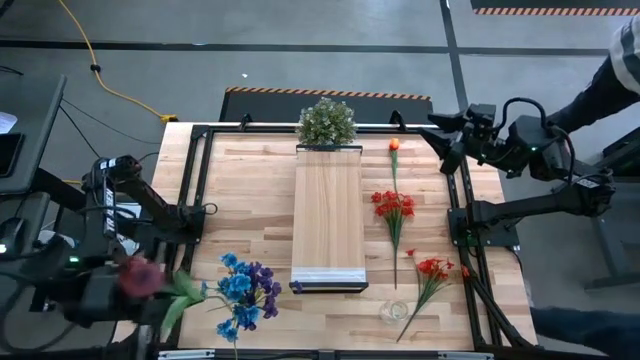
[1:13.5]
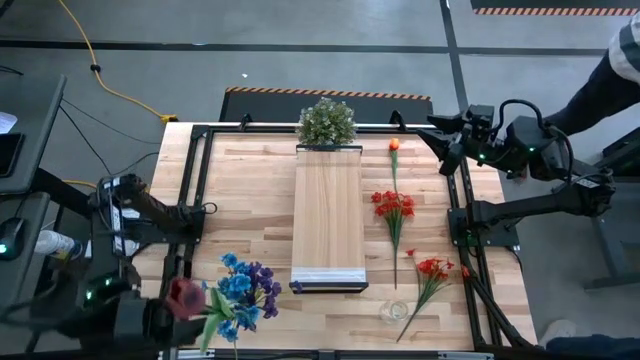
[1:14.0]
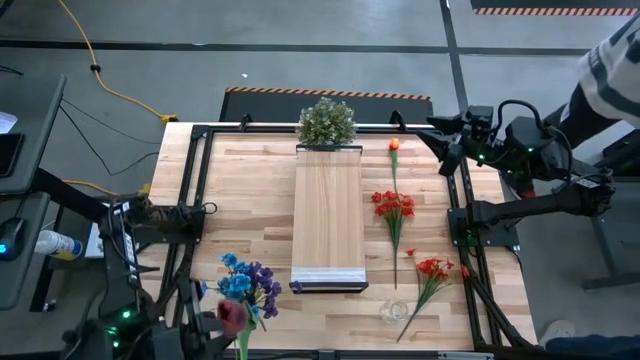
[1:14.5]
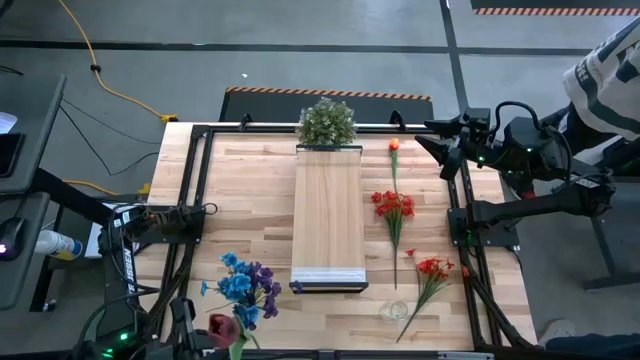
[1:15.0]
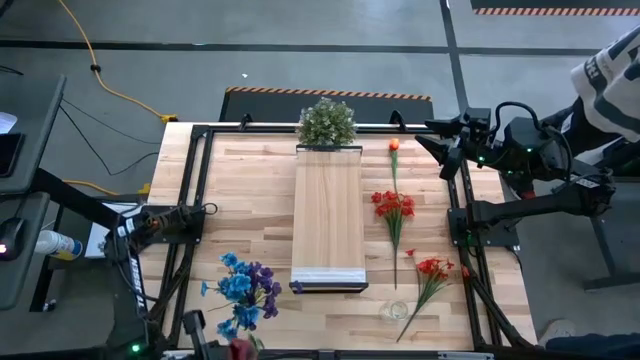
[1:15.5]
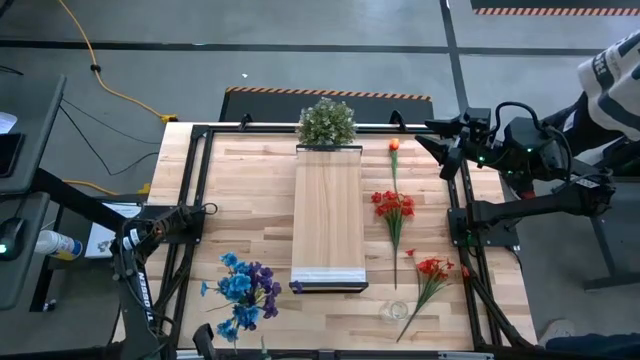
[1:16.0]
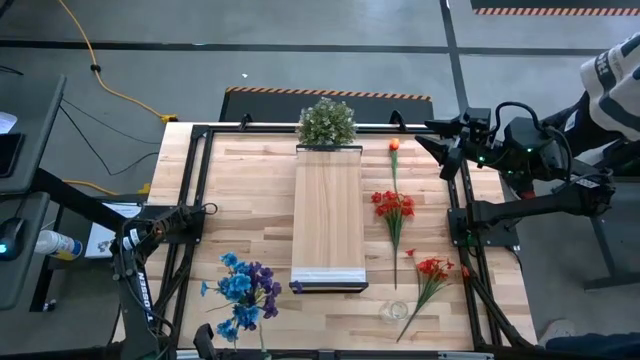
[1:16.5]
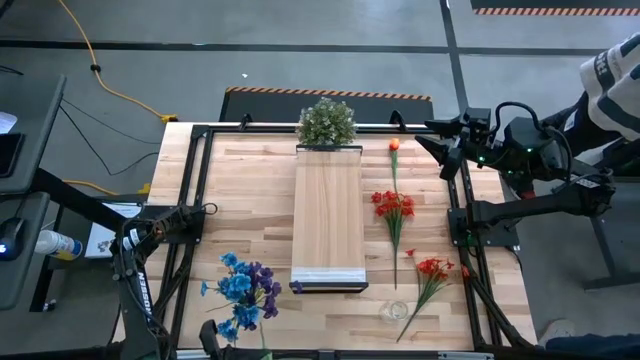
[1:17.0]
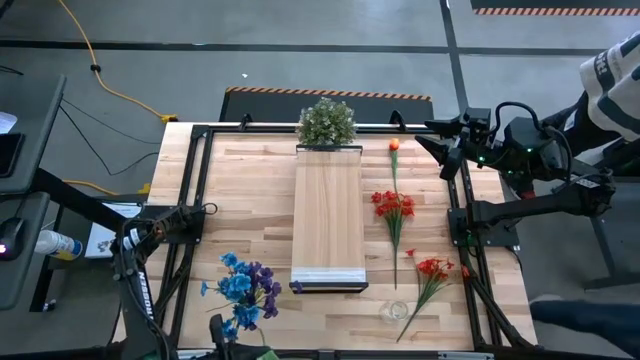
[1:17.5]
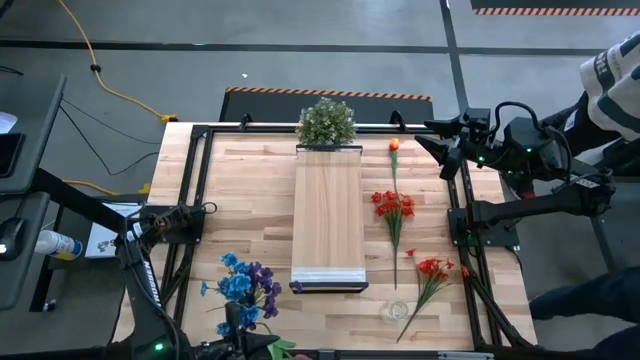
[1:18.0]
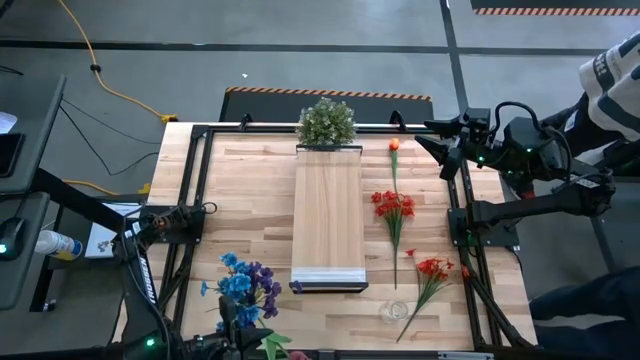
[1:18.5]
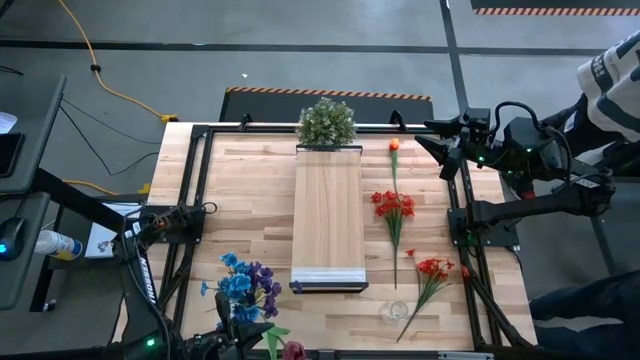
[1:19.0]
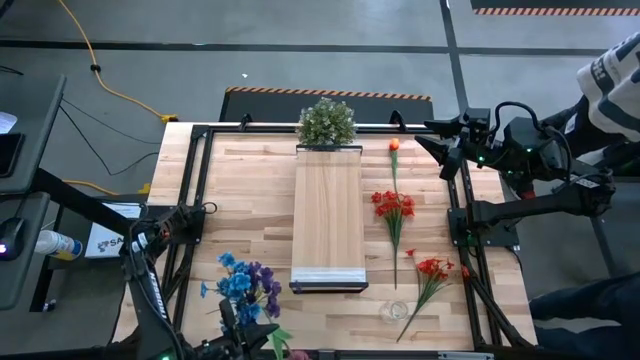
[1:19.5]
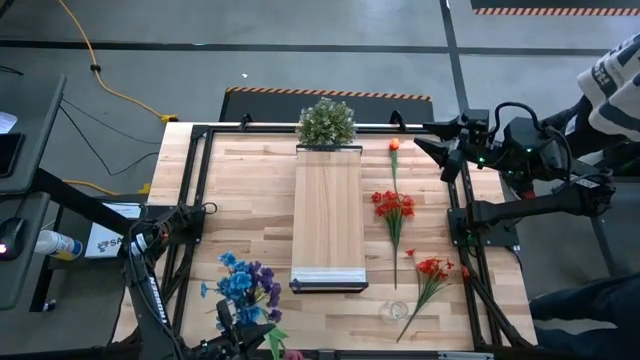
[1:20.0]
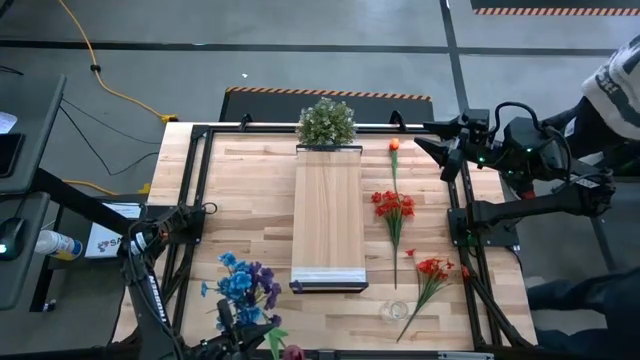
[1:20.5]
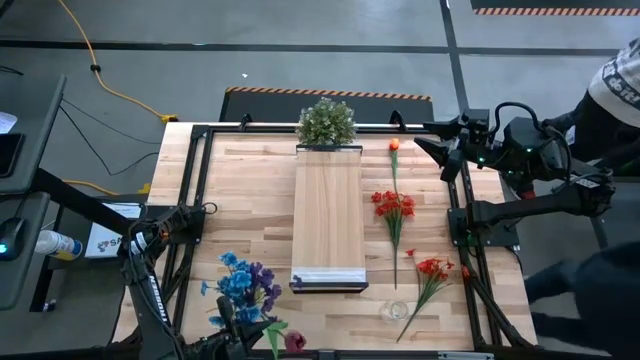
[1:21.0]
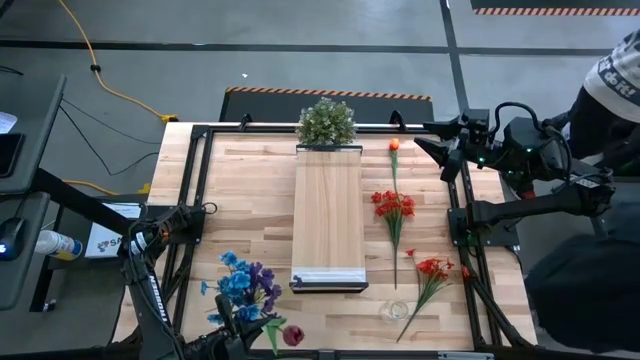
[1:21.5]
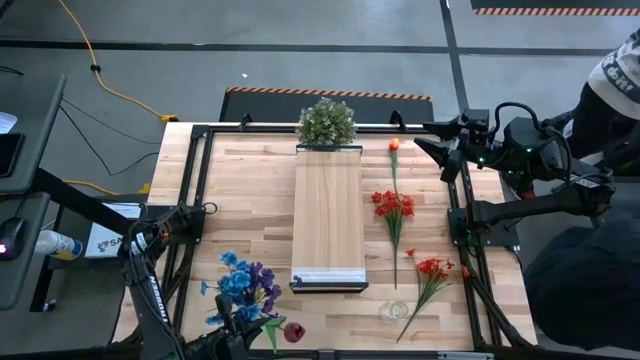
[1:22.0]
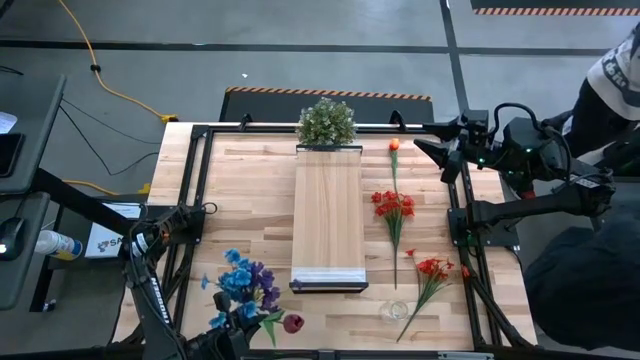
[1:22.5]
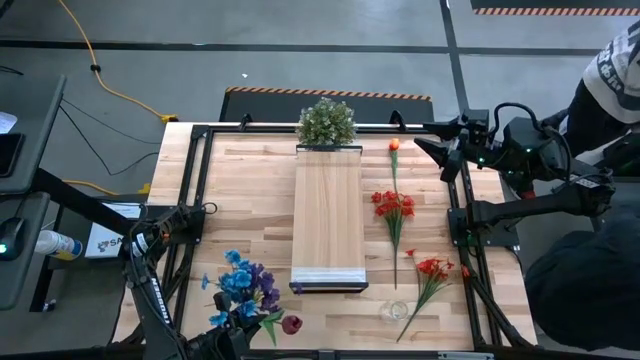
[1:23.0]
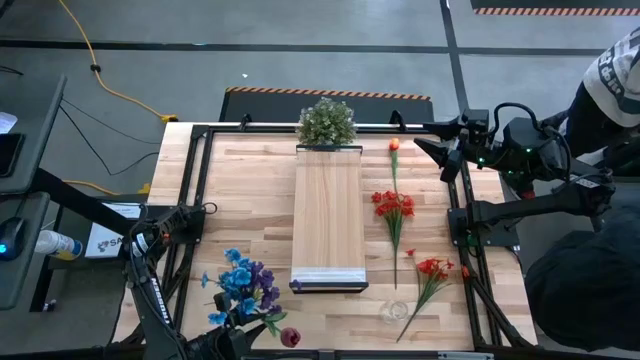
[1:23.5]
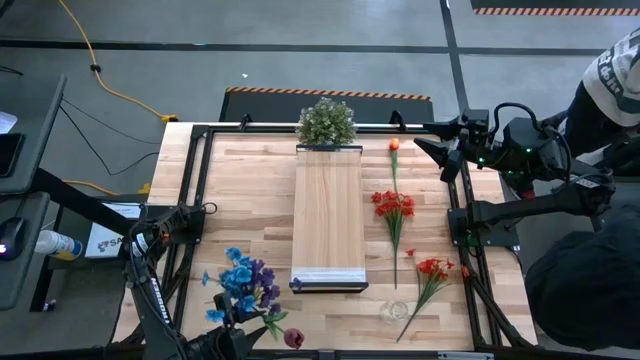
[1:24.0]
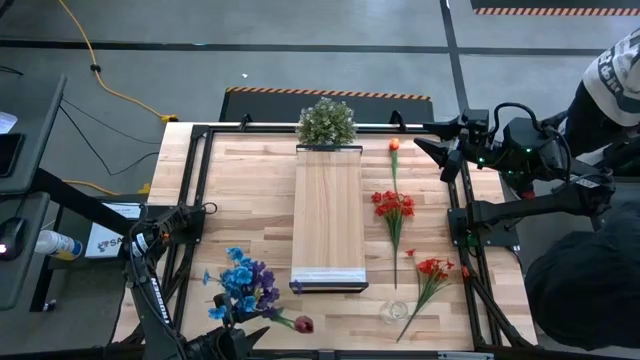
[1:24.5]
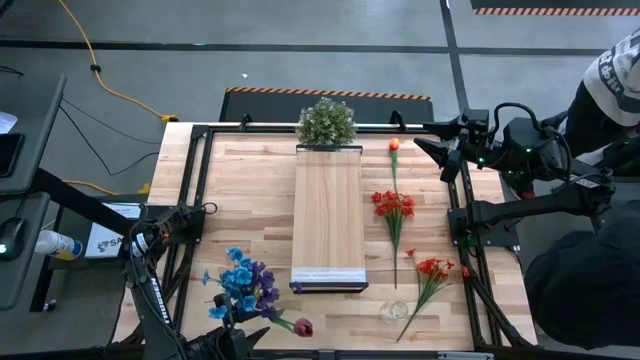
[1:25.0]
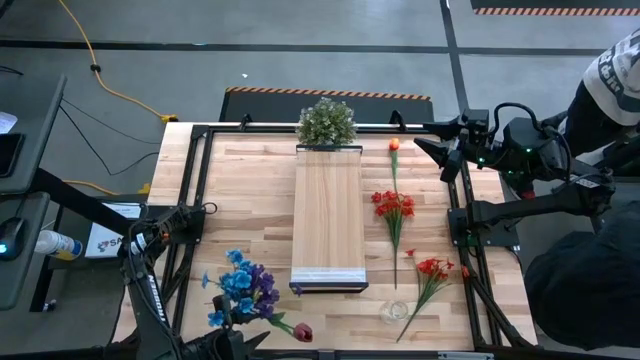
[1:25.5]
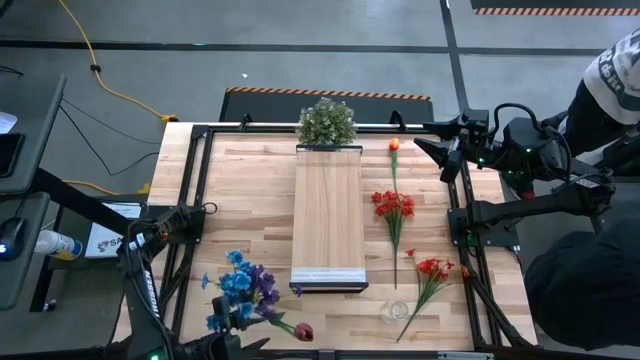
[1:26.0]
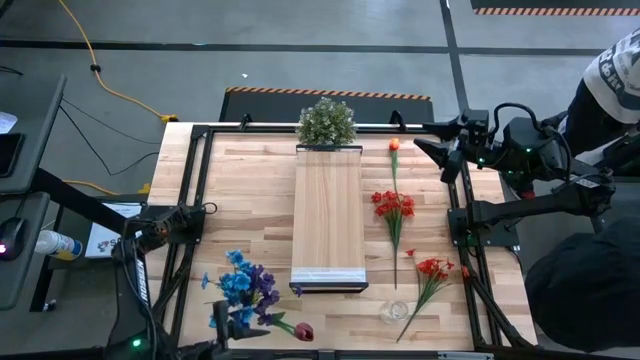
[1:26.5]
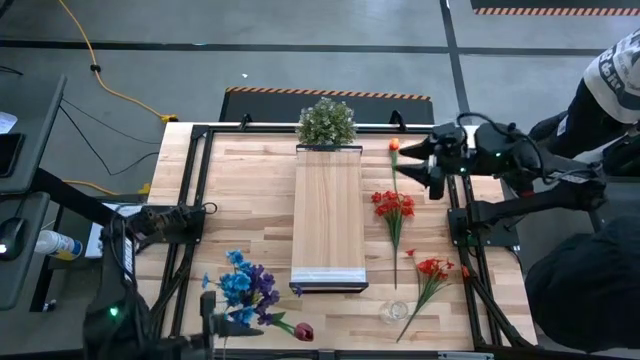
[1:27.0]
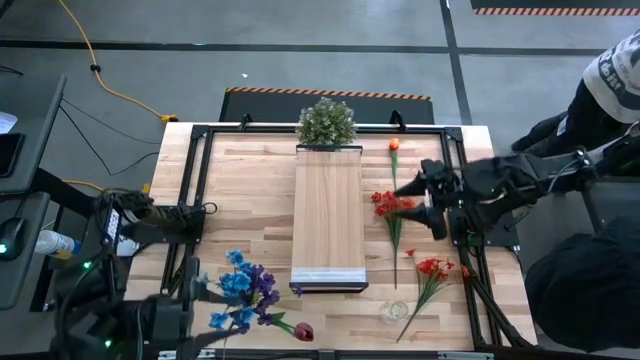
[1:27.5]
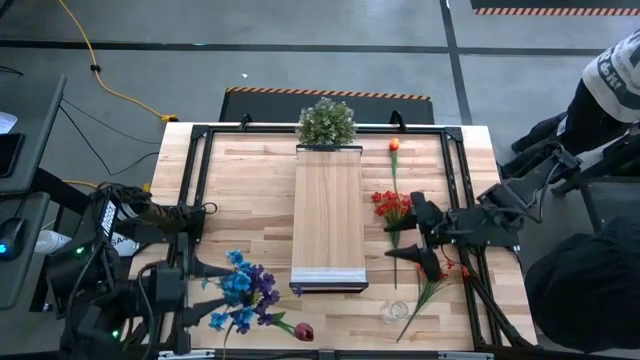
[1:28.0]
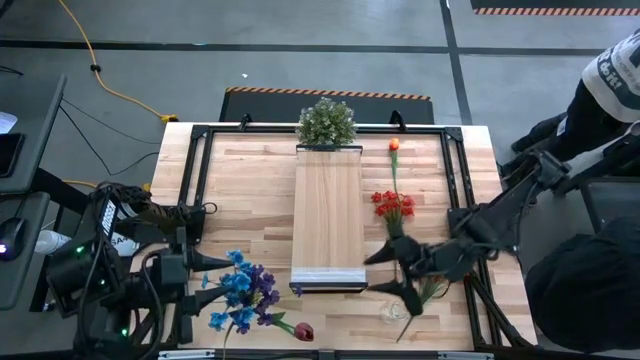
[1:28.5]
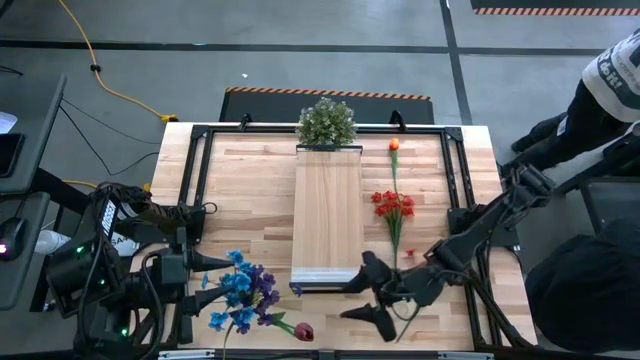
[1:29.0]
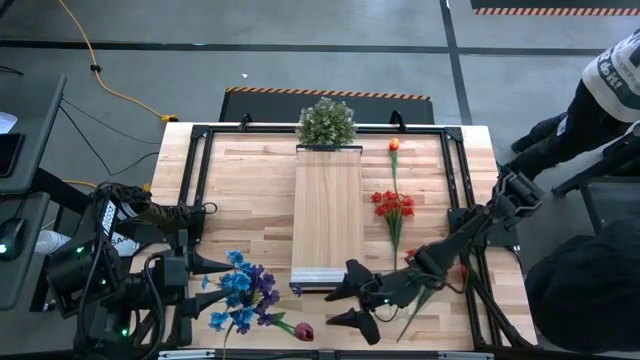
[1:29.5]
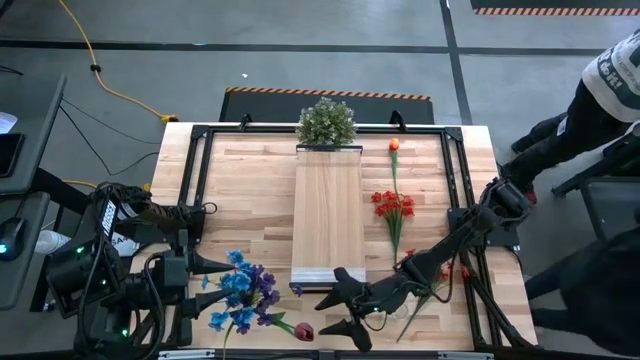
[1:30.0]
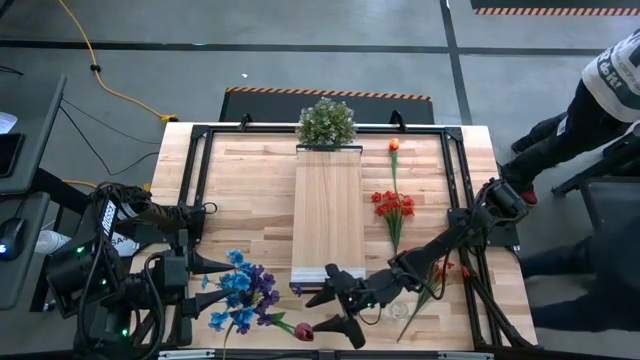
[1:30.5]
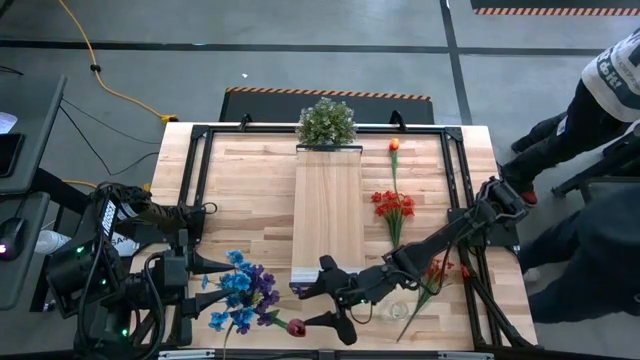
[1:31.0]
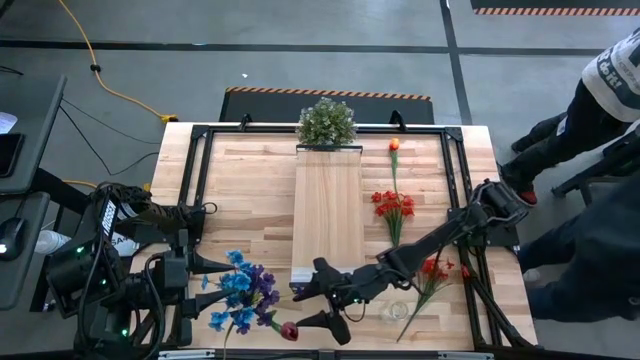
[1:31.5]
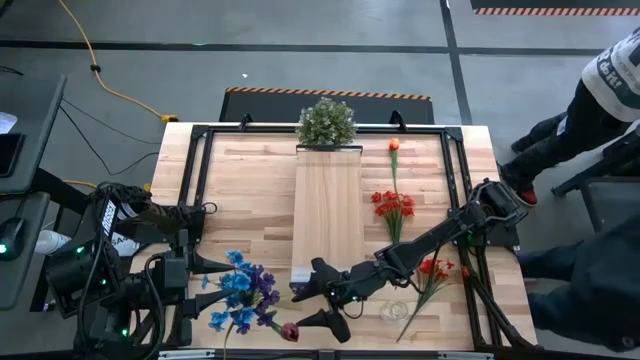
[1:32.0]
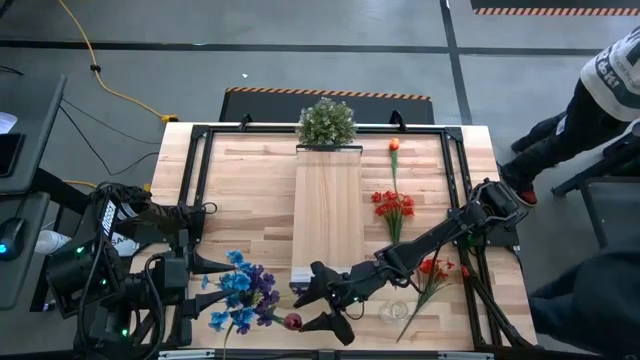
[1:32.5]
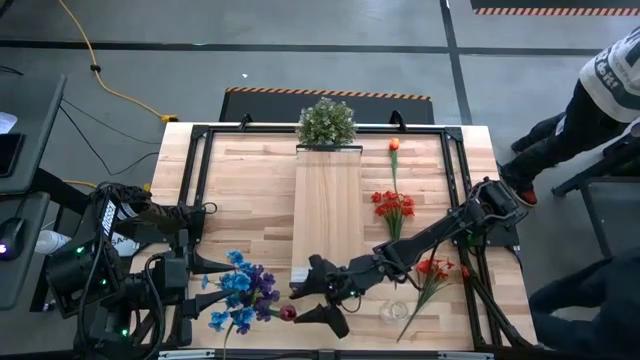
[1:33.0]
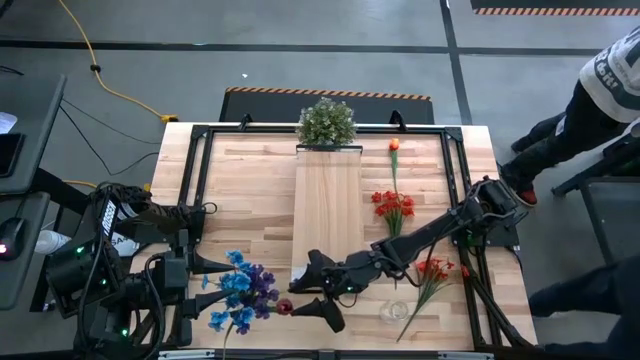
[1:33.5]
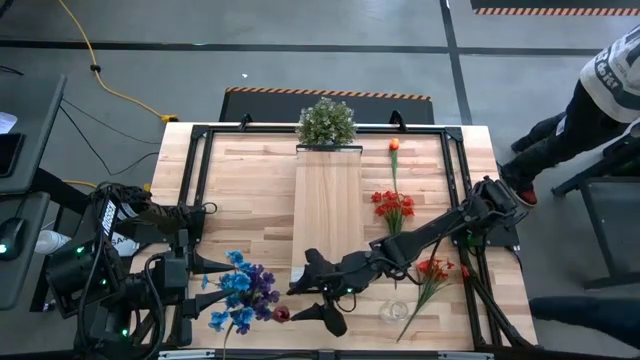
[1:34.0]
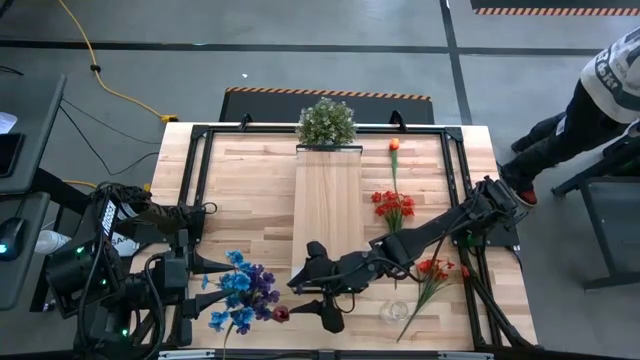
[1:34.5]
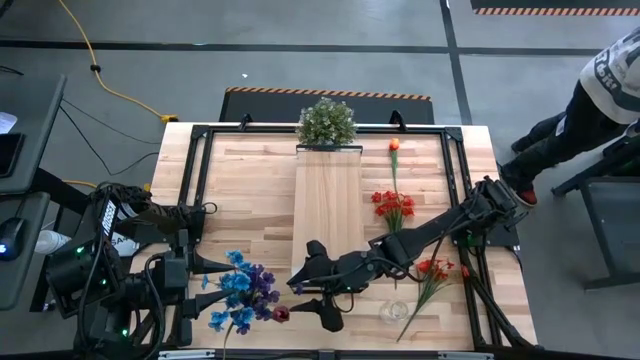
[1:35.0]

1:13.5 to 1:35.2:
Task: Pick and place flowers into a vace then onto a shelf
Put the red tulip into the left transparent vase
